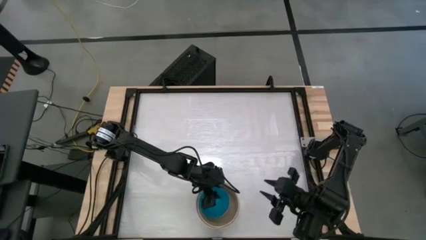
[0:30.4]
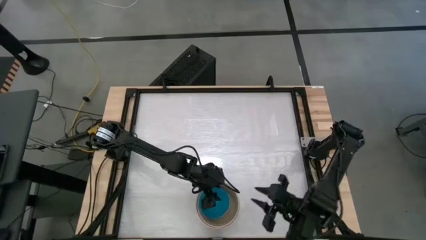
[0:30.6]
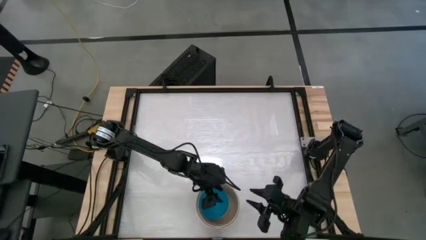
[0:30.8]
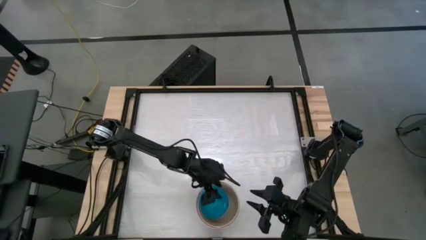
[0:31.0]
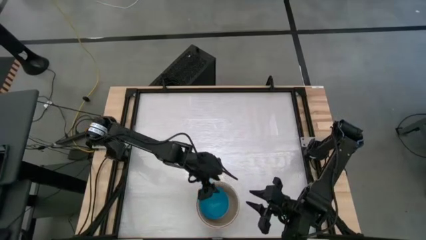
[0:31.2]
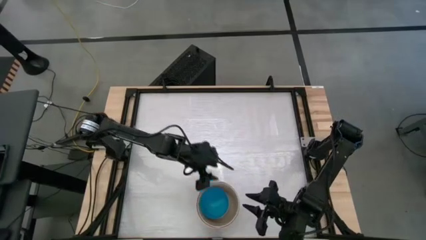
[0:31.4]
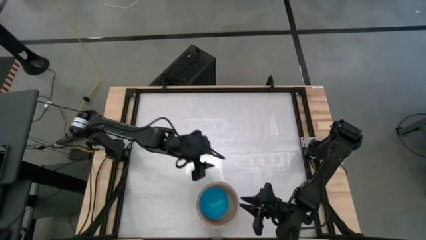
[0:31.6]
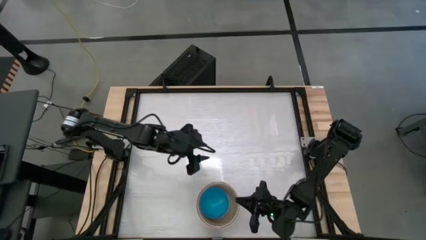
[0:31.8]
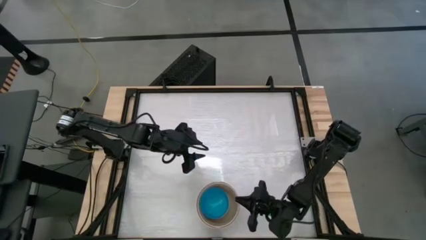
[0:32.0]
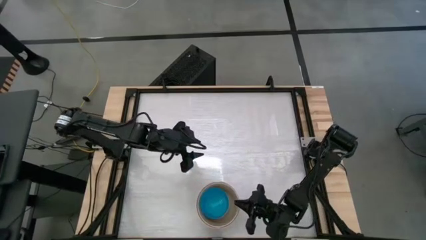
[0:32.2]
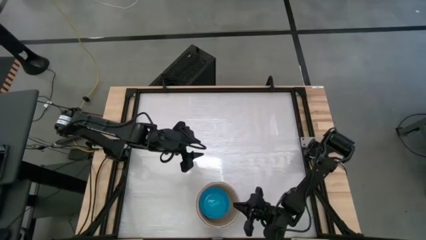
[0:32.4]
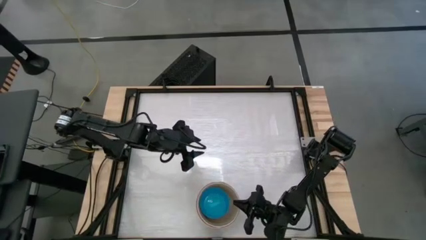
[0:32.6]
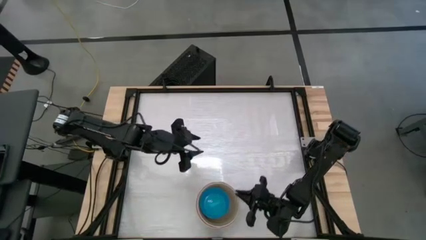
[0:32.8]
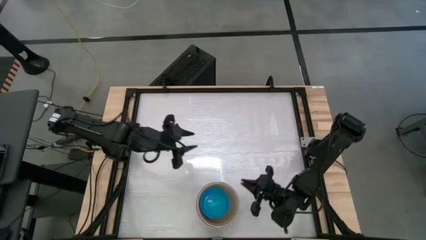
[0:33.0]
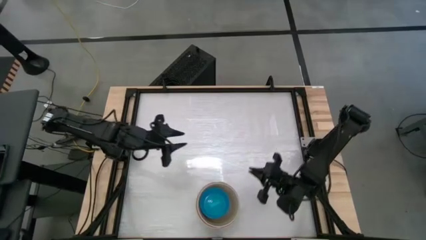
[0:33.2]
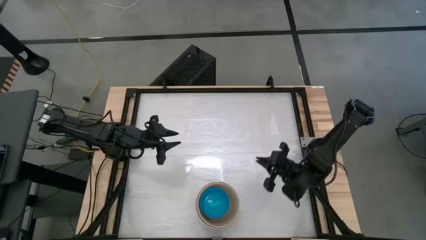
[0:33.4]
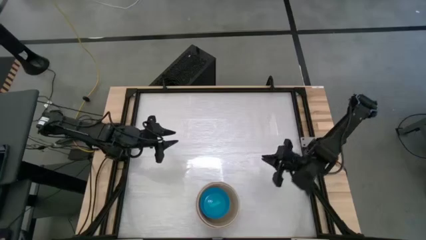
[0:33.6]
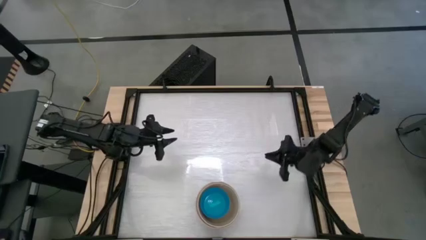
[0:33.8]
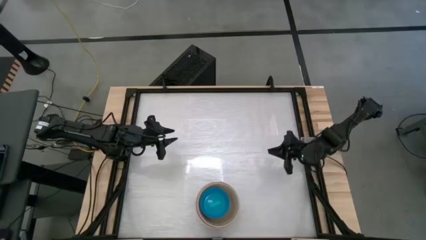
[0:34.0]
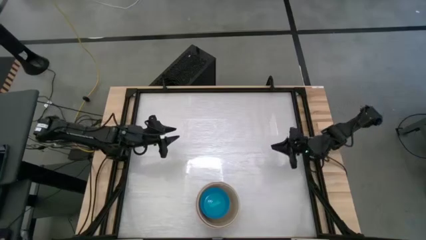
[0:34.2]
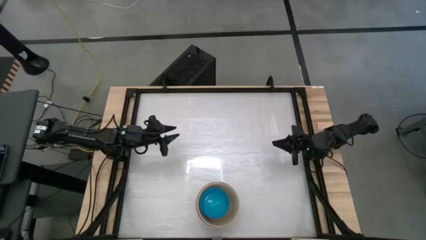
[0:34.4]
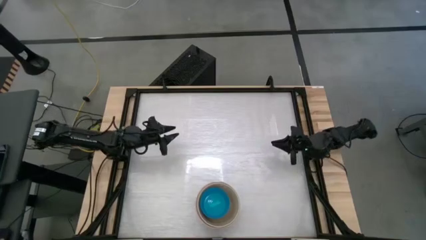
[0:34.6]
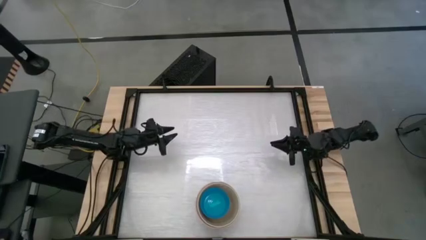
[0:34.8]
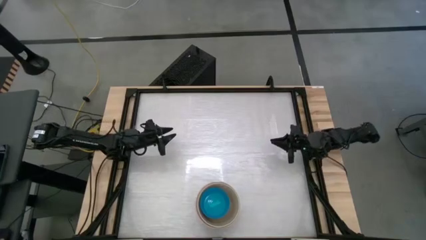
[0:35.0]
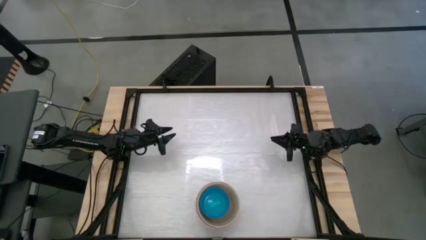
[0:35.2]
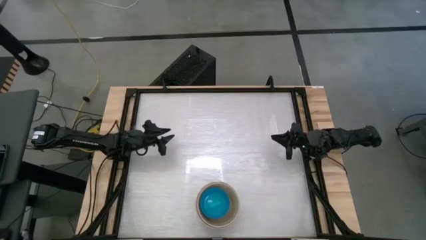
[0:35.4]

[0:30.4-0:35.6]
Return to Home Position
